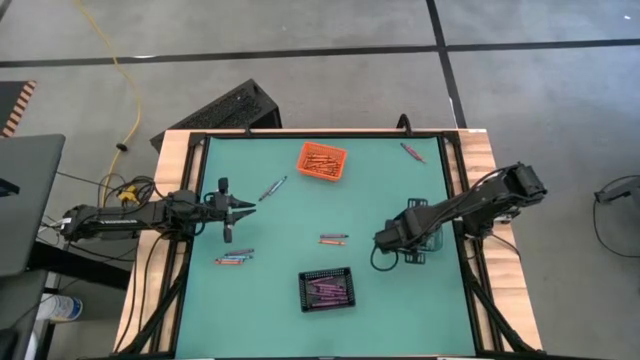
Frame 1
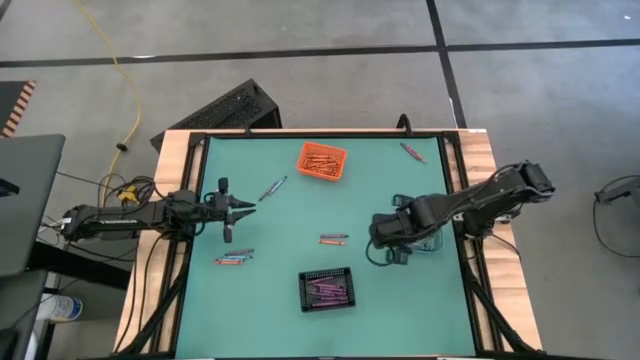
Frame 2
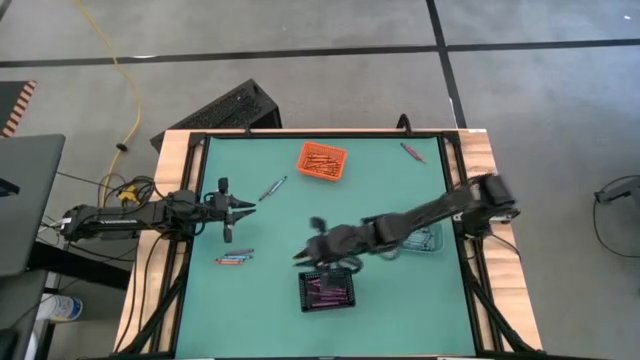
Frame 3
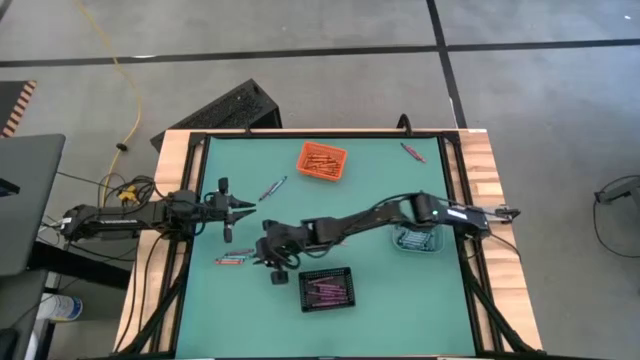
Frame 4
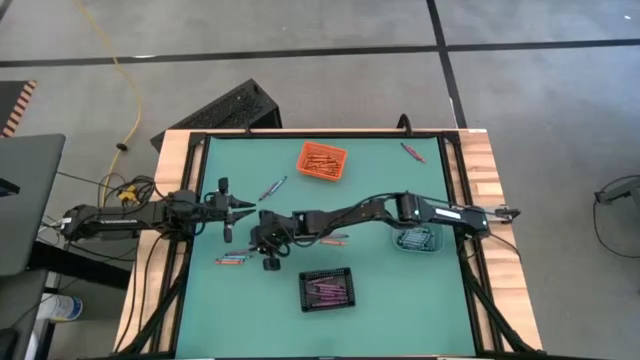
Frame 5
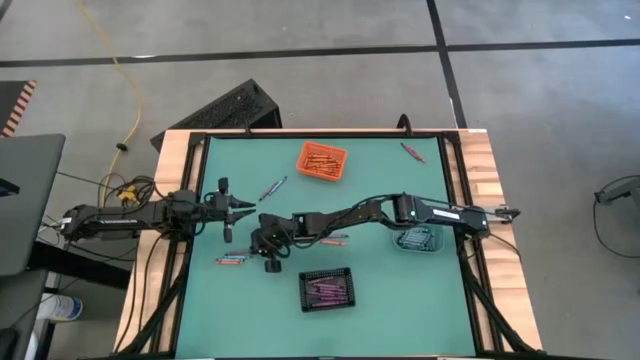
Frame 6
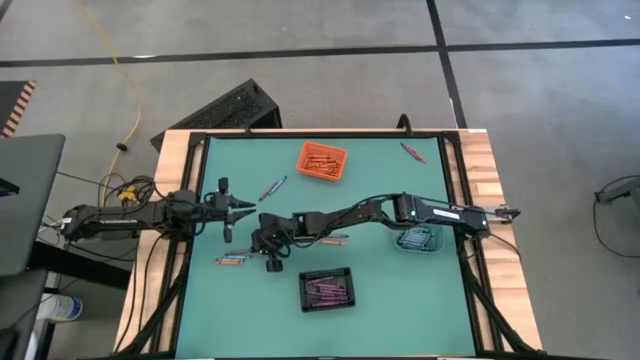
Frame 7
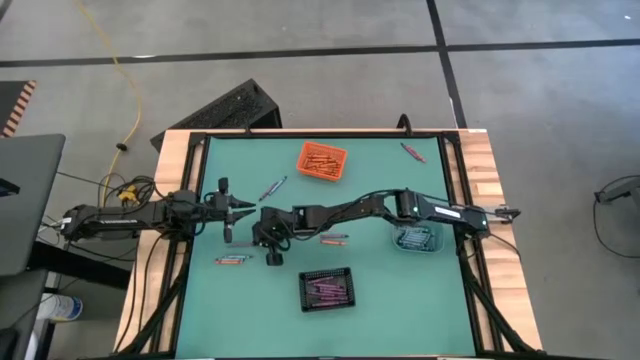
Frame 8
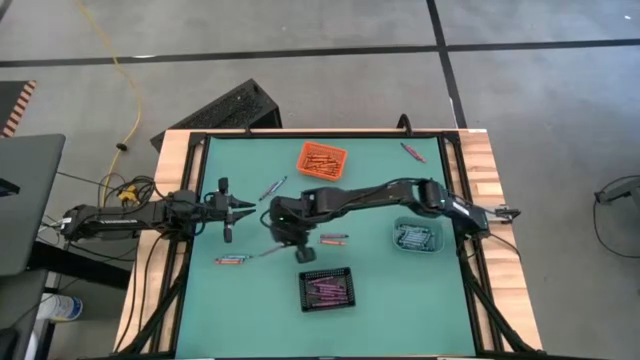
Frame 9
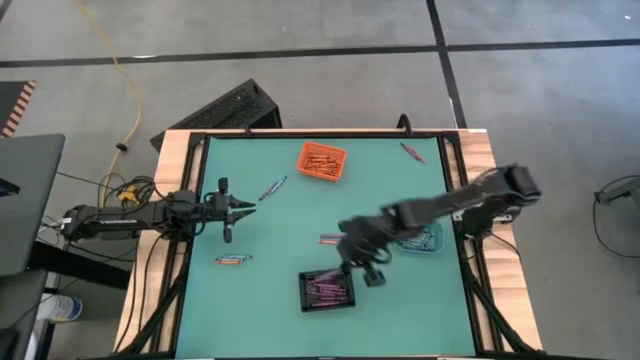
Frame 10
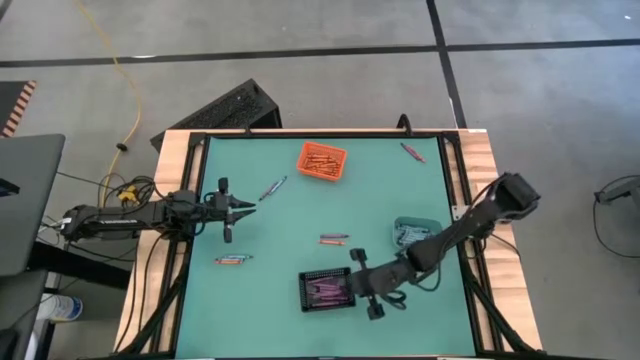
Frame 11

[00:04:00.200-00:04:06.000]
Task: Sort crayons
Put the purple crayon into the black bin

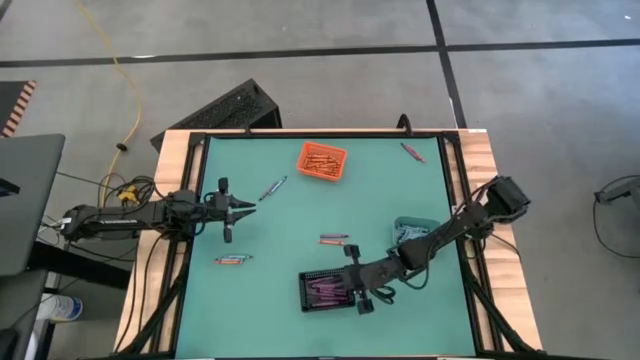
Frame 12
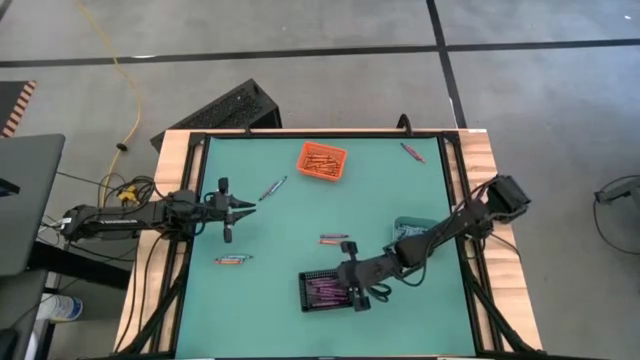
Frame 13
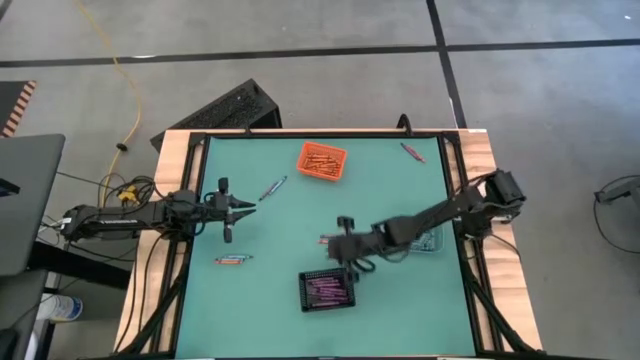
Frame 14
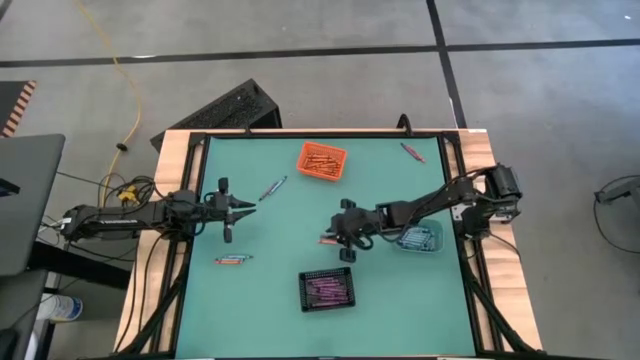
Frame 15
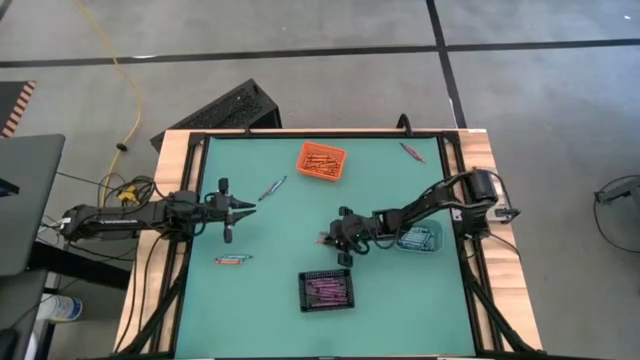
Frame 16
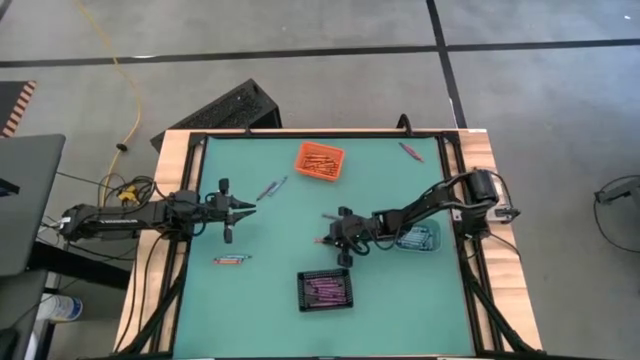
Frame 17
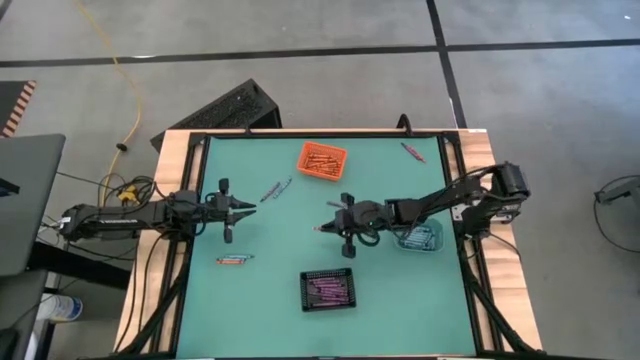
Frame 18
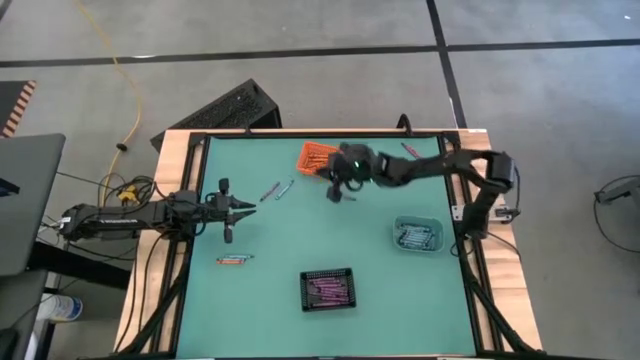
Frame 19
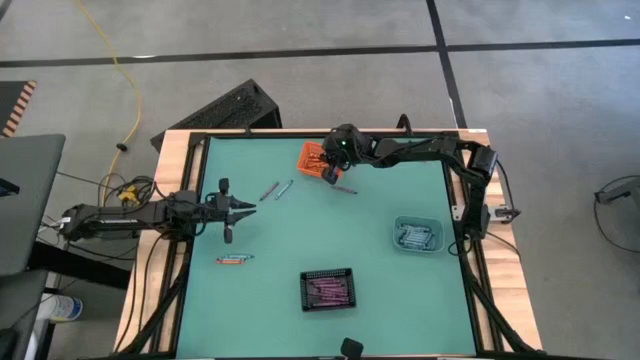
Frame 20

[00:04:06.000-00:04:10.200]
Put the orange crayon into the orange bin

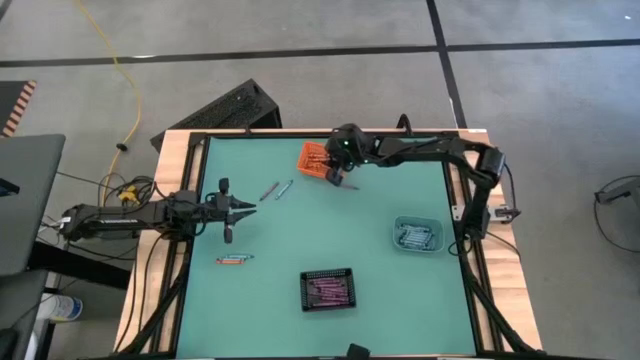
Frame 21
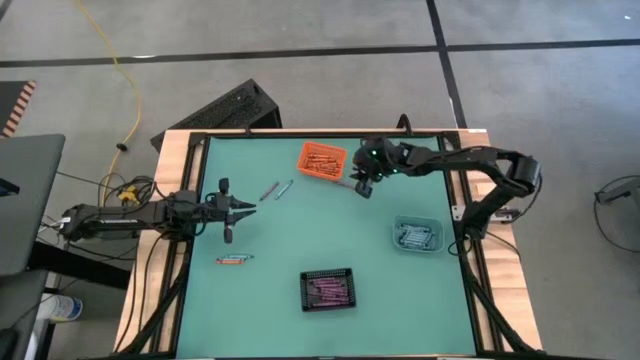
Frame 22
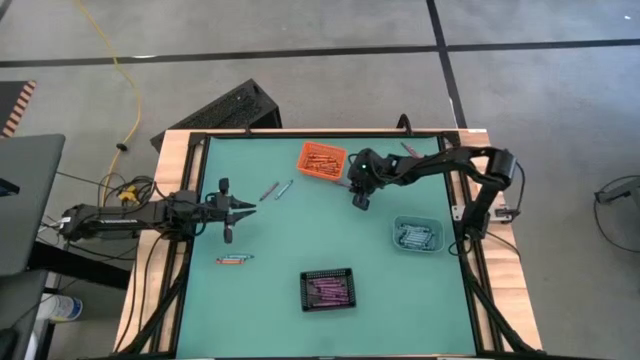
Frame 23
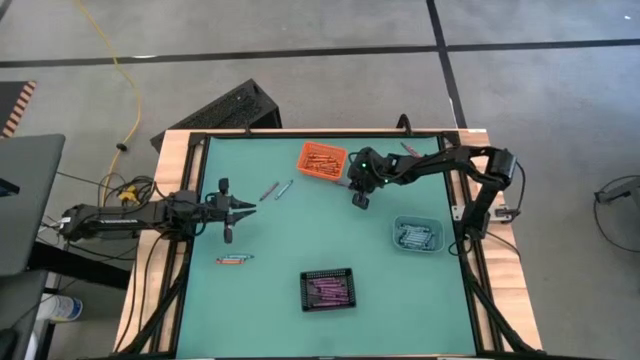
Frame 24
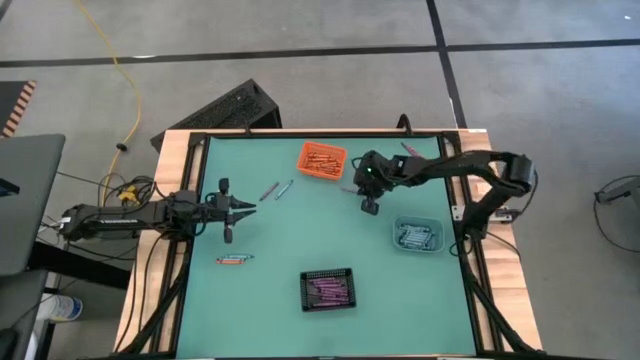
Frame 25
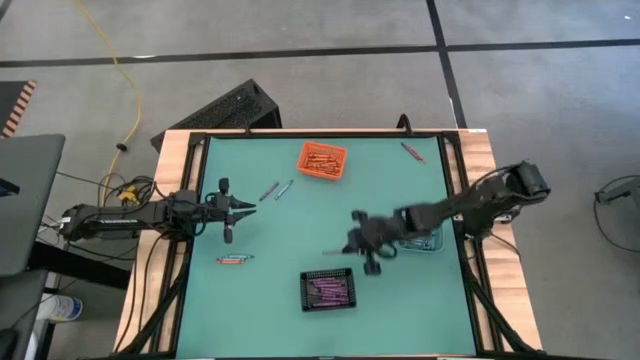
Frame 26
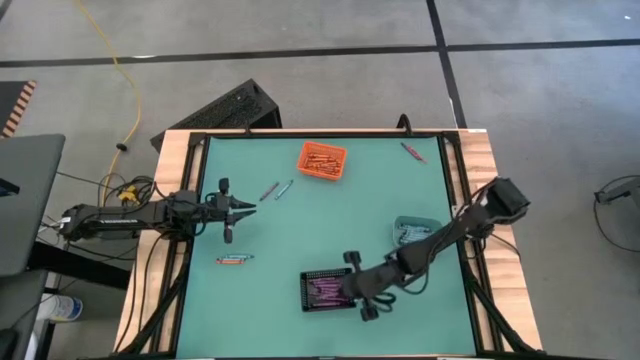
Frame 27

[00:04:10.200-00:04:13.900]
Put the purple crayon into the black bin

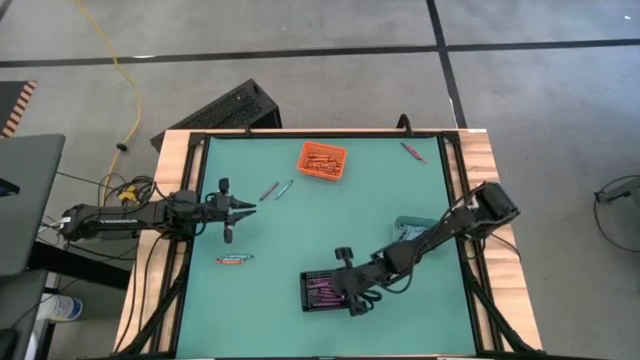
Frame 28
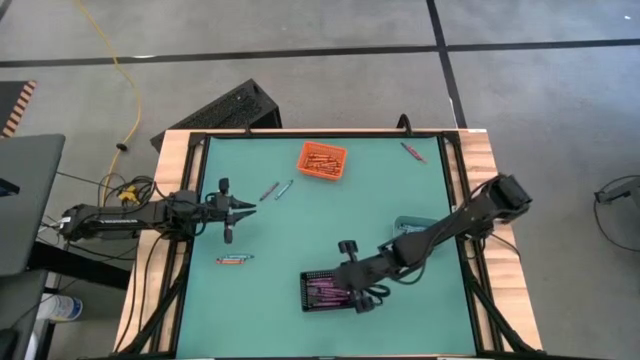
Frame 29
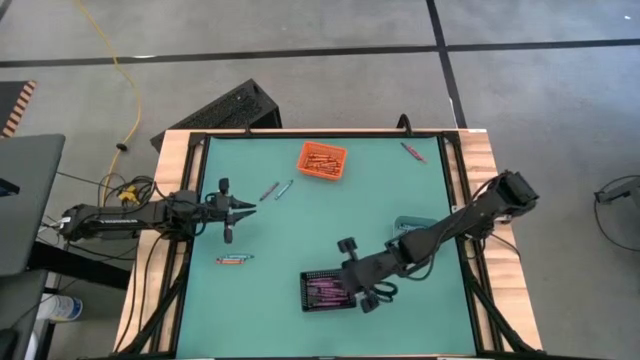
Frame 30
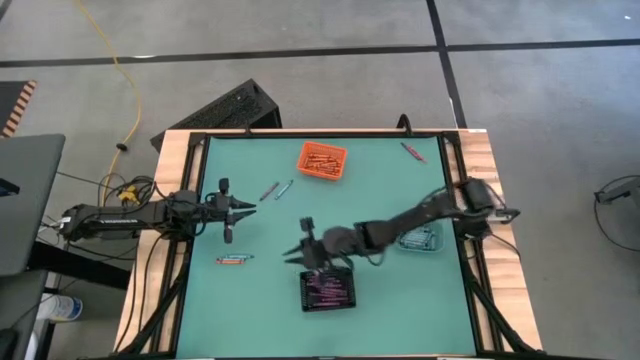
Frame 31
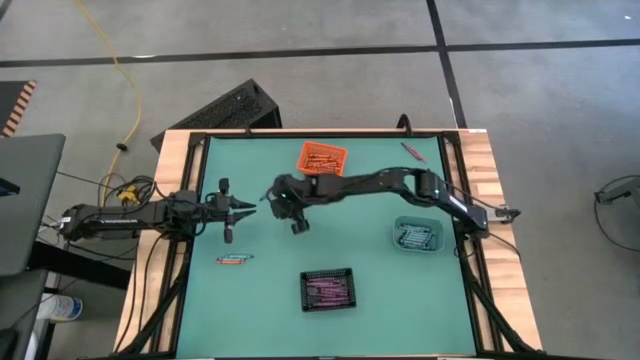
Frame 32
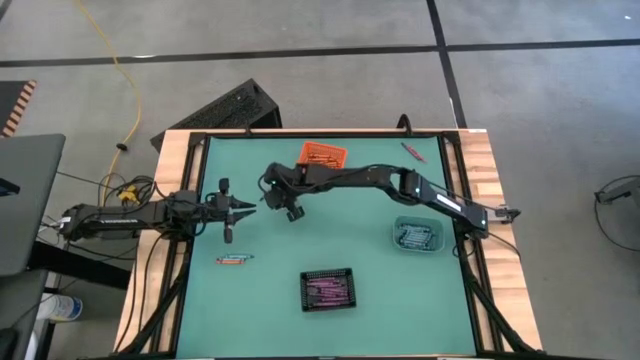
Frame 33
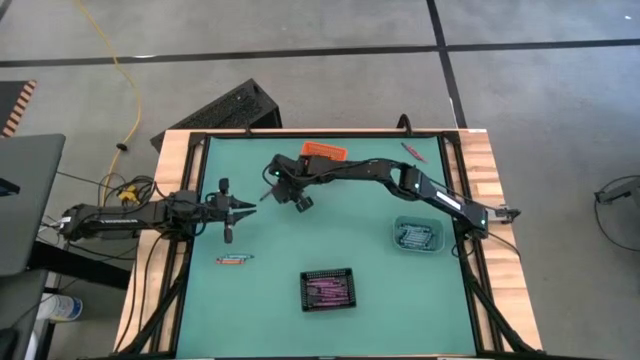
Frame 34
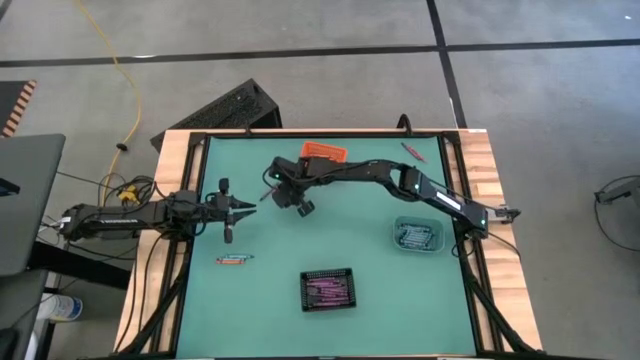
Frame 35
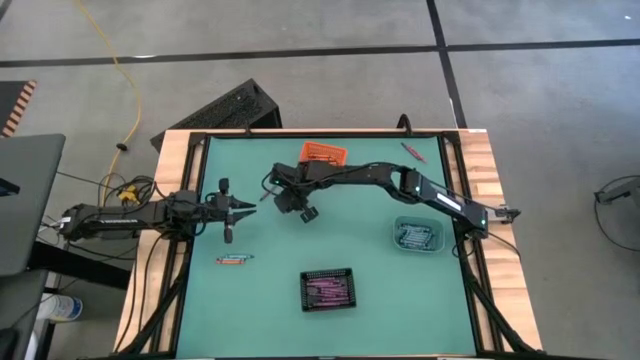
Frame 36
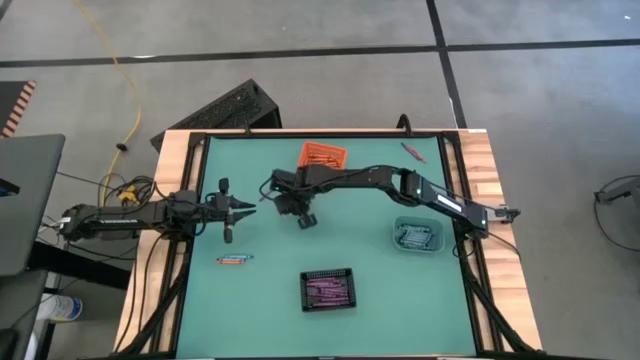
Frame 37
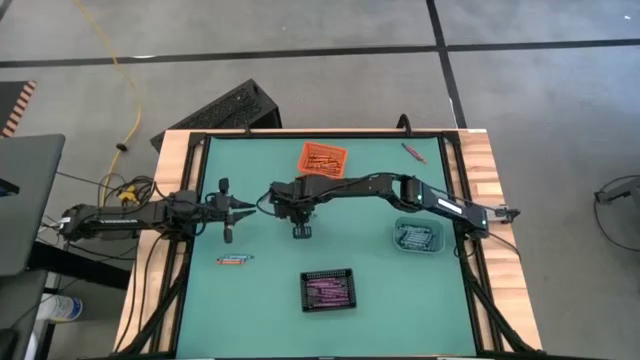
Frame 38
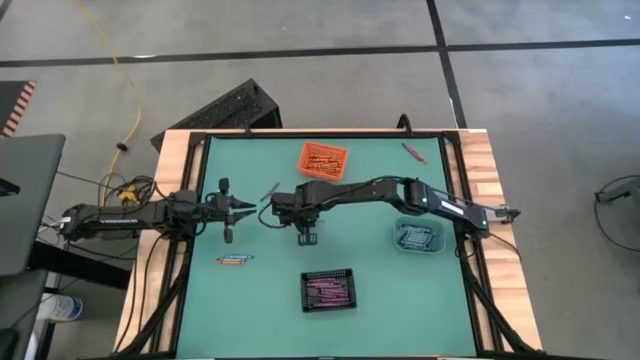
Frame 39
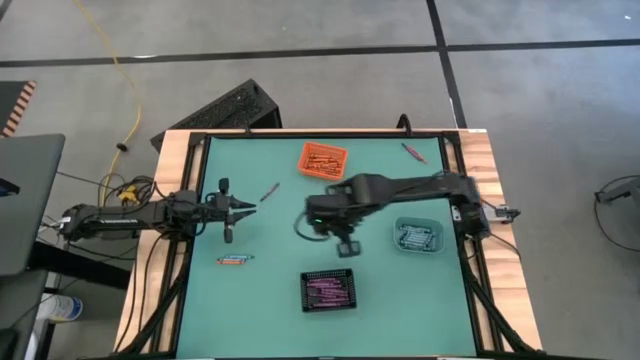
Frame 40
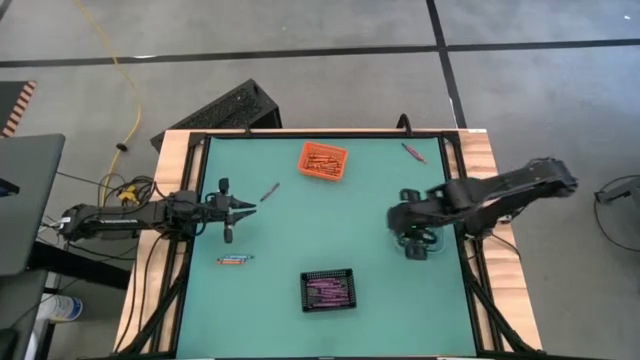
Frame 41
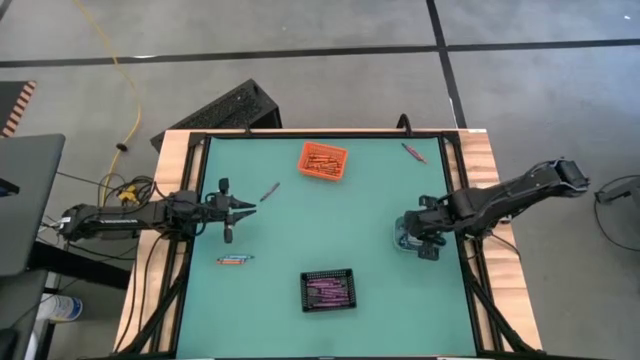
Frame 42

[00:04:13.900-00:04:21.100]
Put the blue crayon into the blue bin
